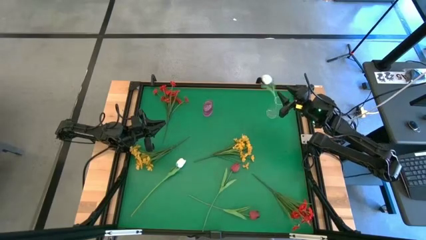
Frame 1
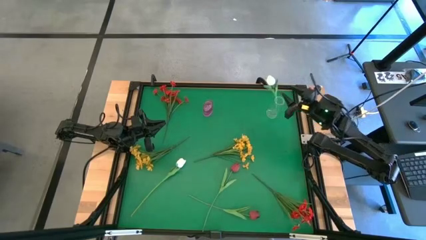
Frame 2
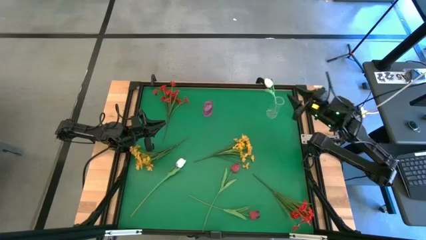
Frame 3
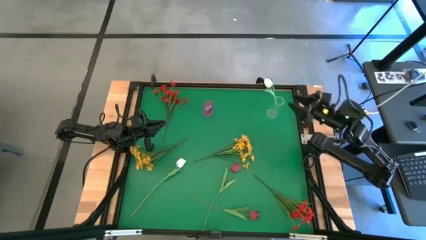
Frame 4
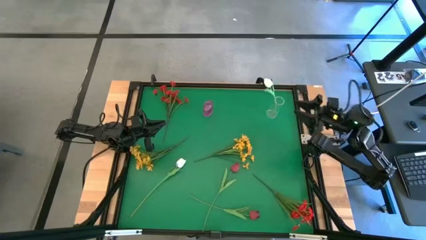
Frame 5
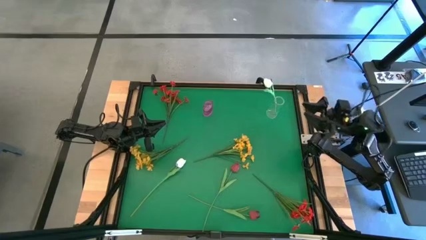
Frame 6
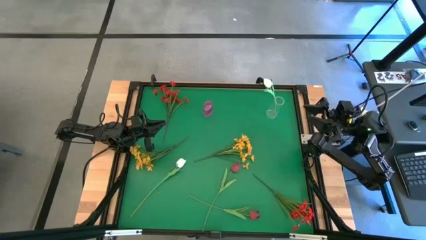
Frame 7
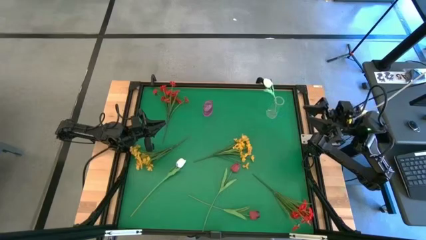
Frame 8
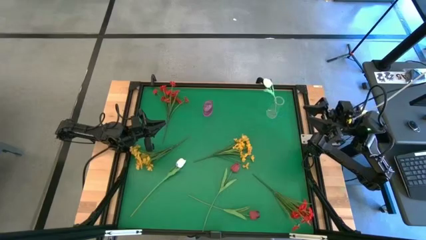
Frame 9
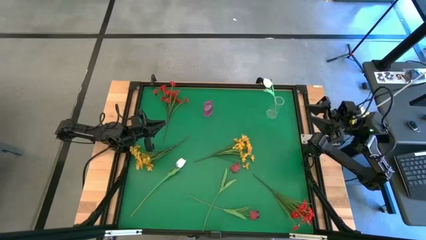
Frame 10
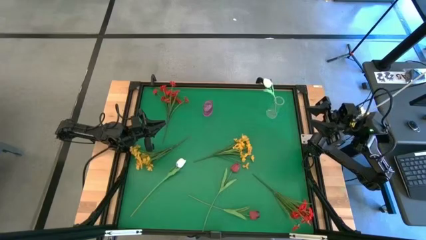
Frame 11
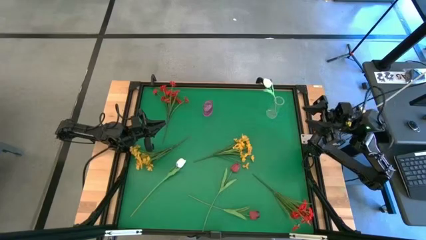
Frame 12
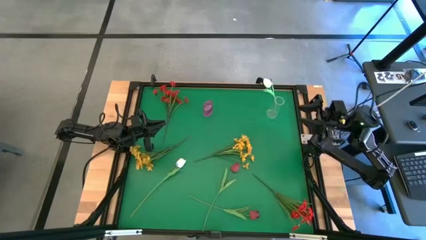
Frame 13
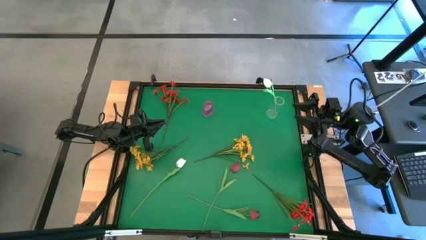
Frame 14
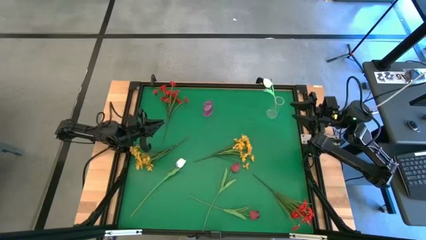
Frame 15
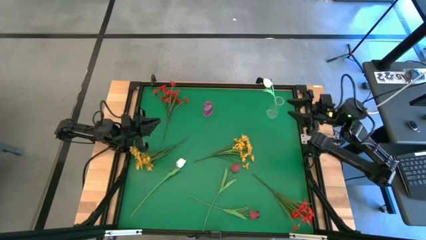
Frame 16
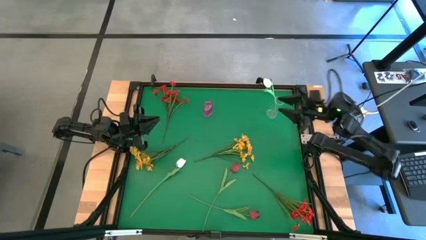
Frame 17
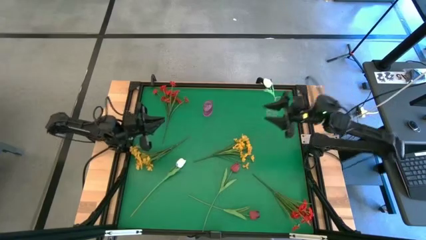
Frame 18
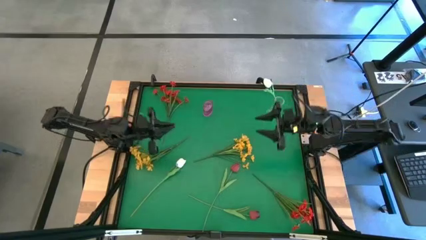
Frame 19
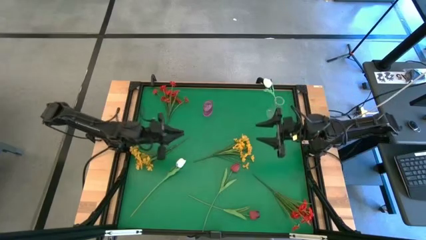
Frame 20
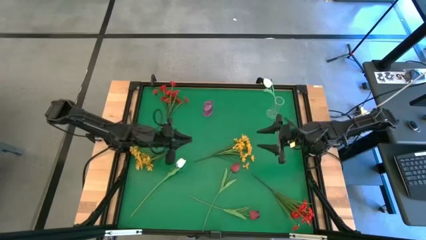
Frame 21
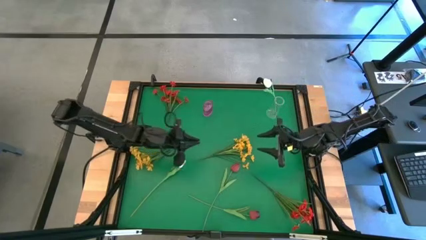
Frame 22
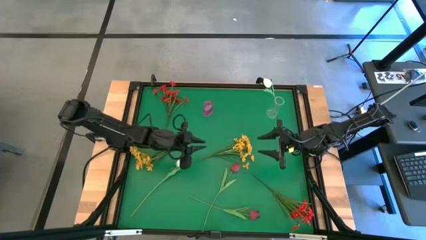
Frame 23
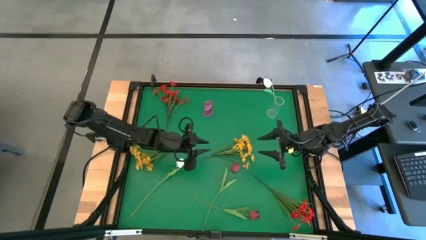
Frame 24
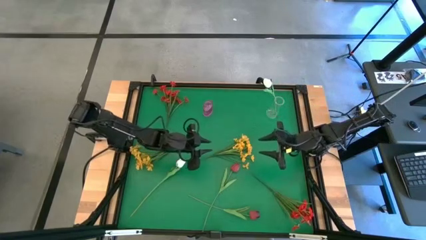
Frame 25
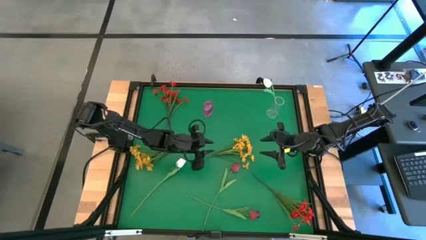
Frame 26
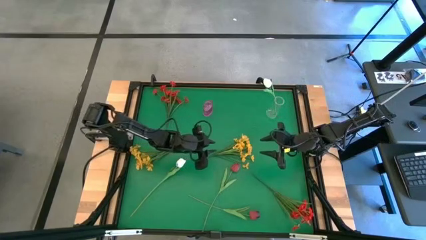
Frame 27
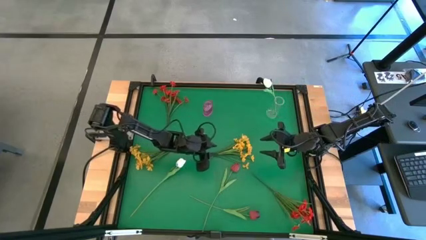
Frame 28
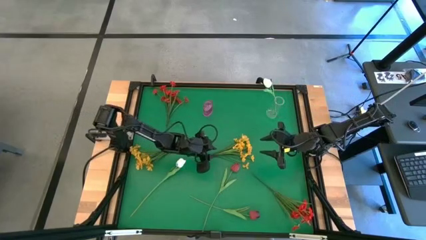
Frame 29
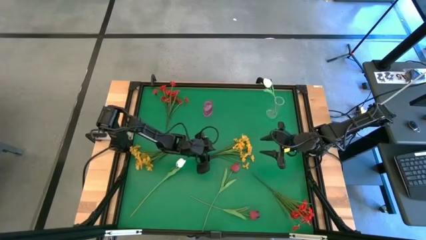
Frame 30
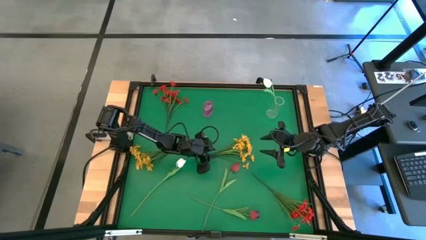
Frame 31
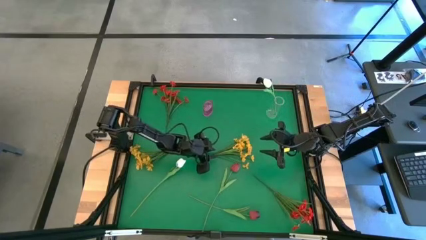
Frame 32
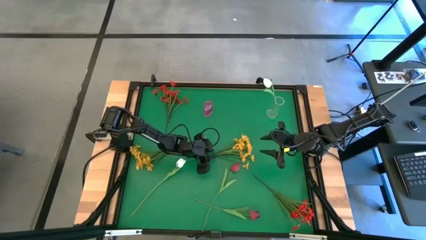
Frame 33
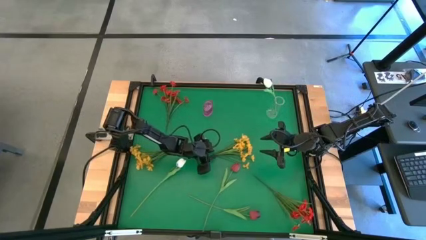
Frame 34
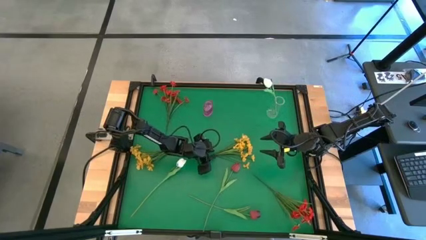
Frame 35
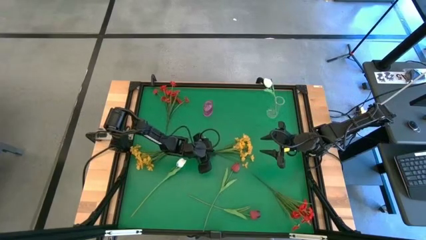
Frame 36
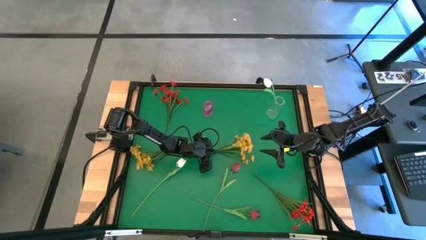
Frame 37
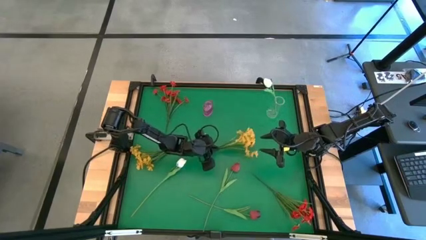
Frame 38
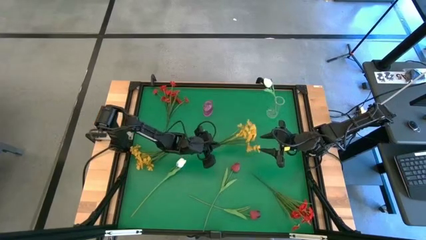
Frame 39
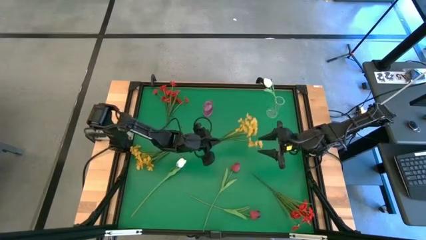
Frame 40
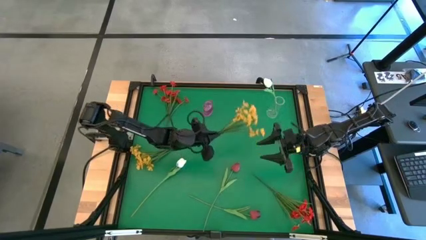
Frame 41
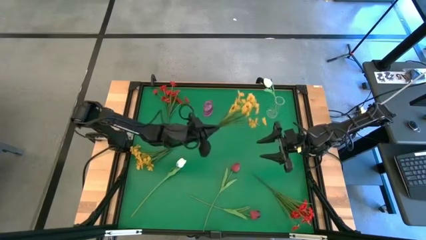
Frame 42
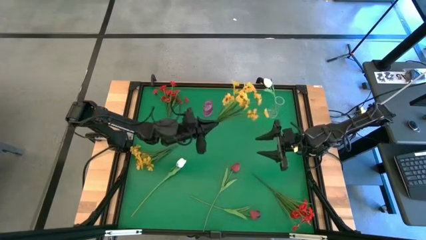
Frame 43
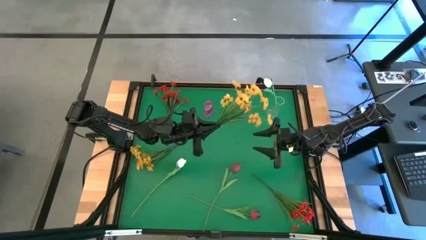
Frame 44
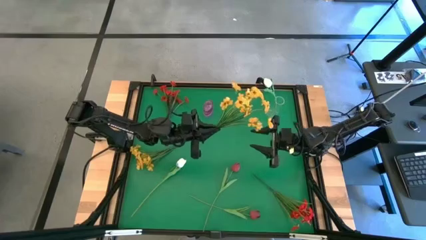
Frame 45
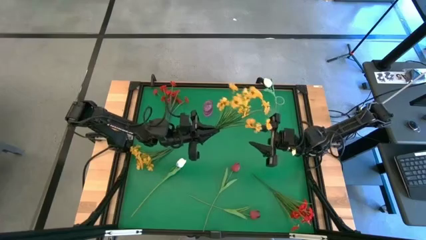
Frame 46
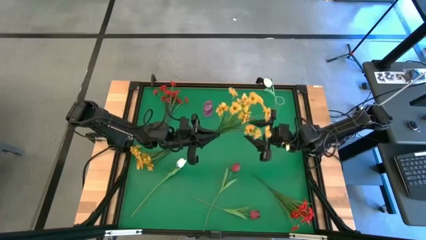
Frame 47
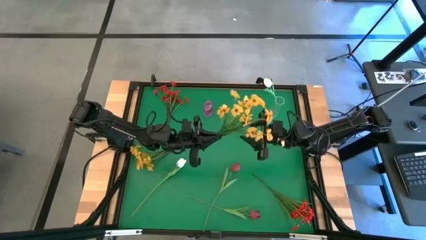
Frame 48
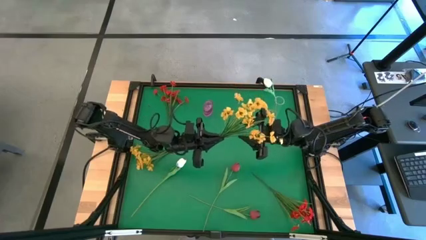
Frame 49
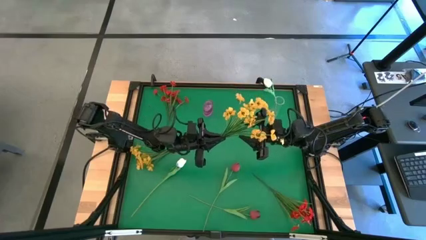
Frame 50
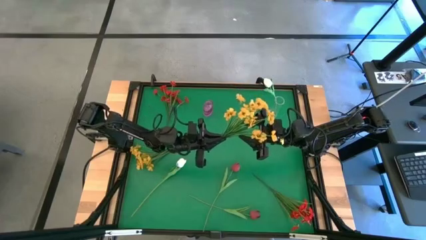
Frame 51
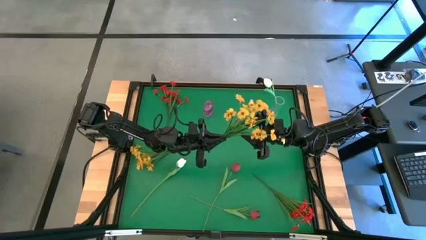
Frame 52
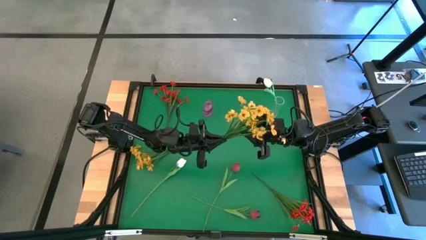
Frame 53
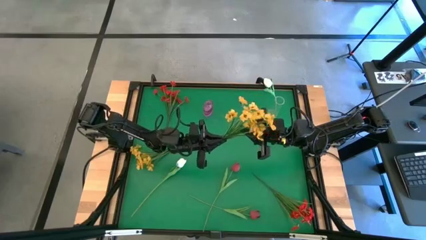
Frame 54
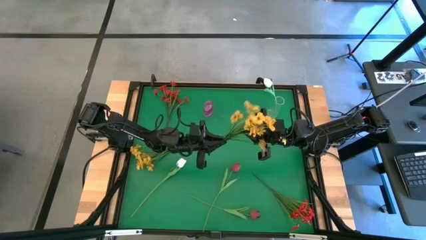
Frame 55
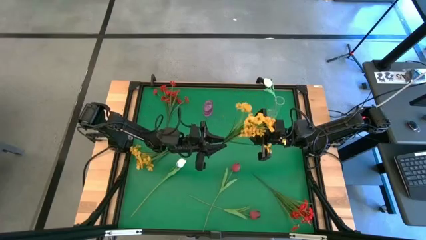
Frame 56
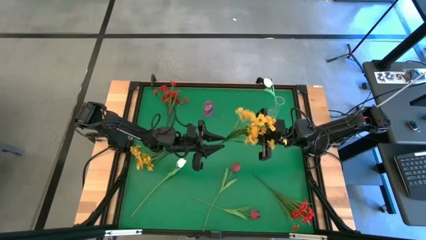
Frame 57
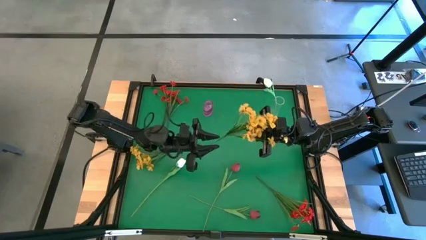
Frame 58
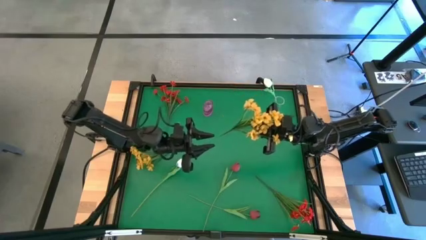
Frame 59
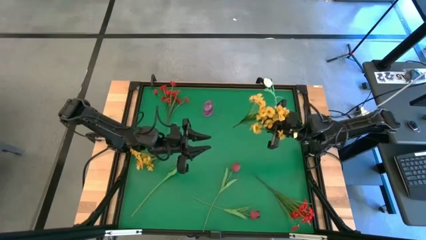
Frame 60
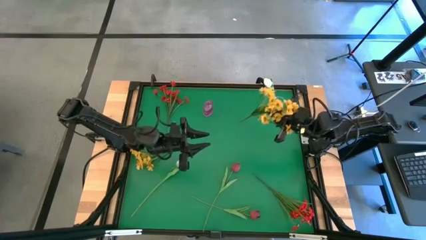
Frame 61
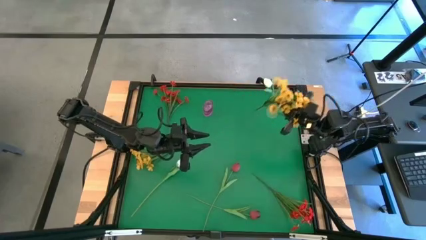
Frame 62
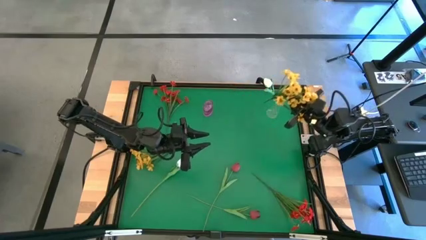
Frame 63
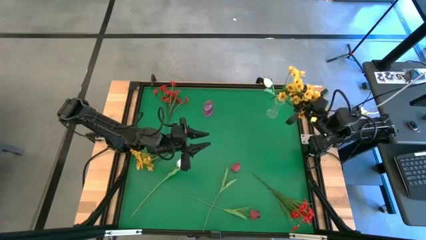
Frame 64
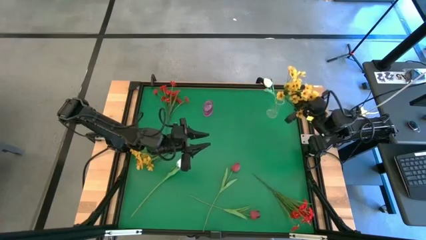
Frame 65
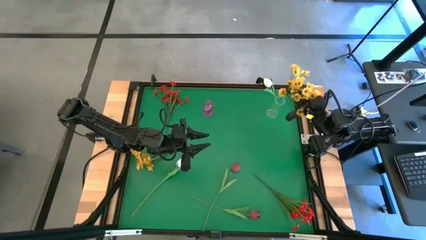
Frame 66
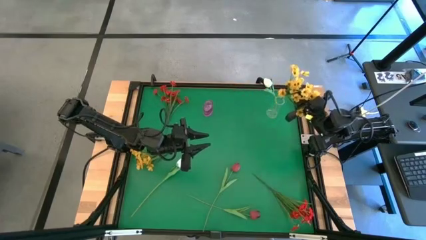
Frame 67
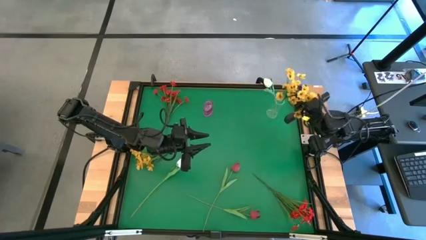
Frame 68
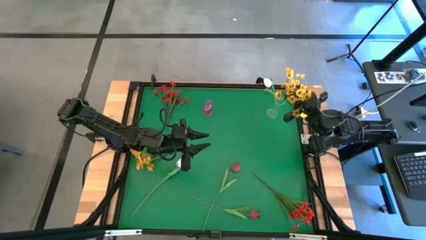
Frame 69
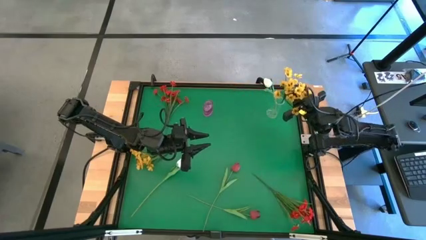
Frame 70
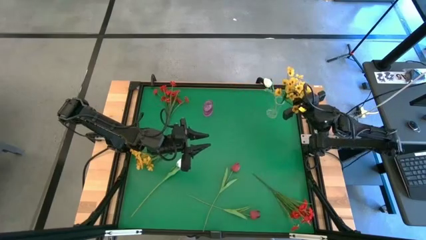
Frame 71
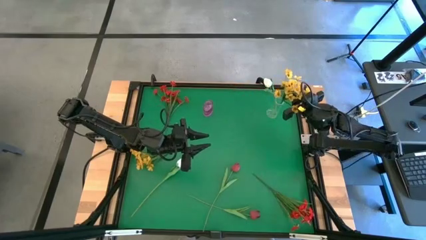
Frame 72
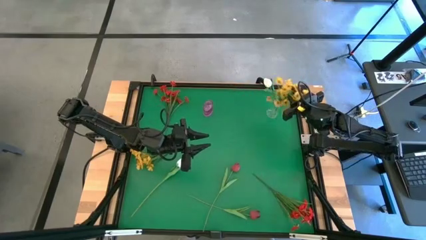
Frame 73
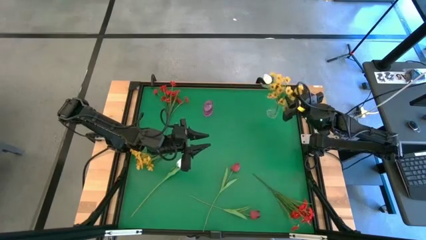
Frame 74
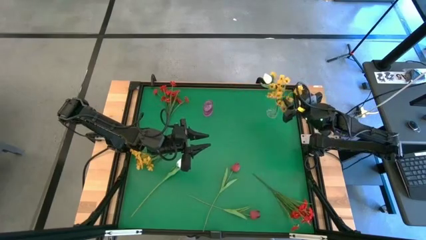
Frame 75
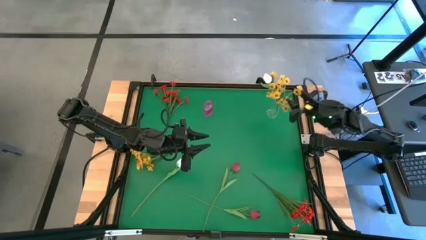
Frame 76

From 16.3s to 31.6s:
Task: Sort flowers into vase by color
Put the right yellow flowers into the transparent vase
